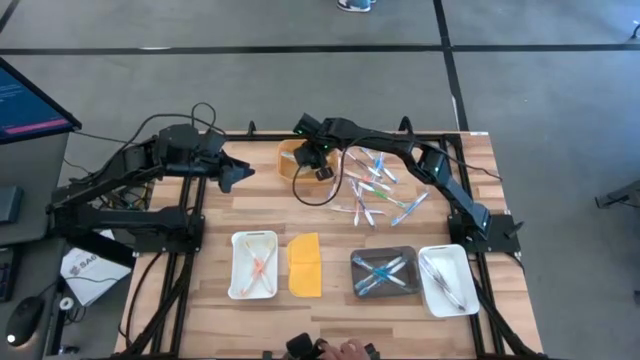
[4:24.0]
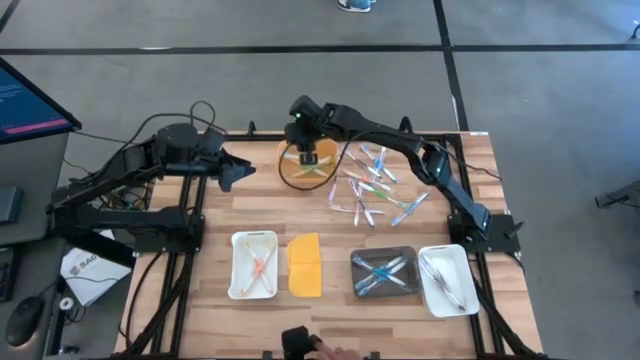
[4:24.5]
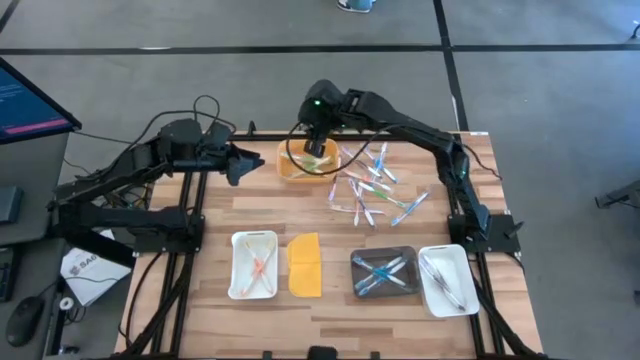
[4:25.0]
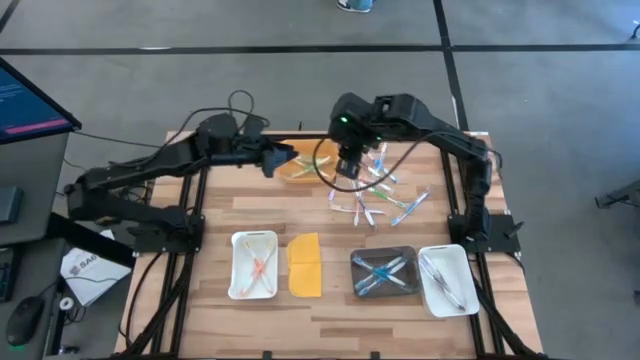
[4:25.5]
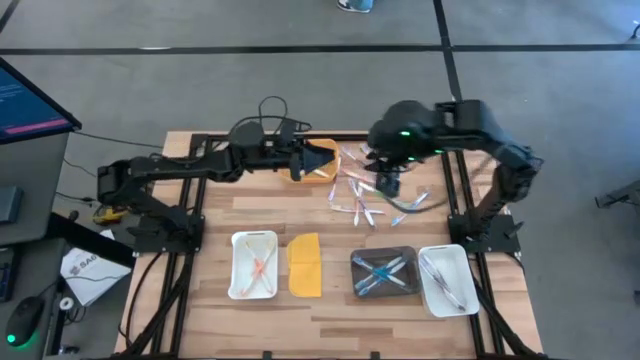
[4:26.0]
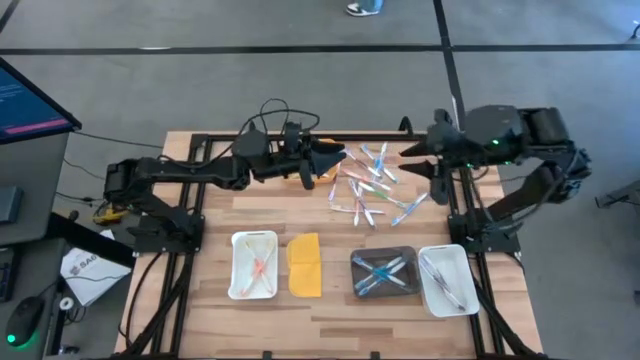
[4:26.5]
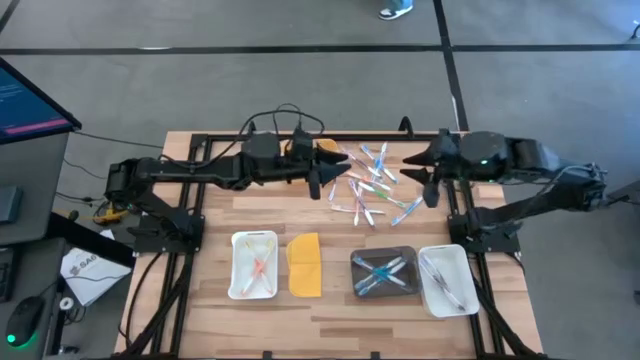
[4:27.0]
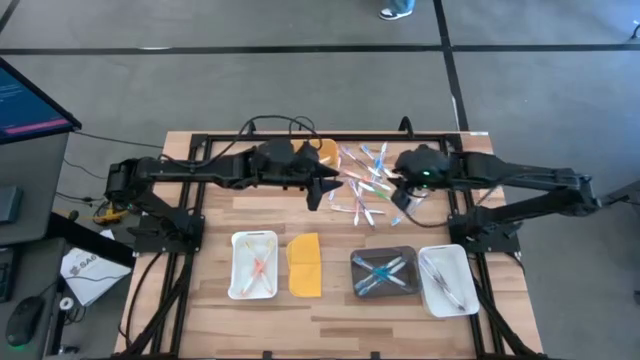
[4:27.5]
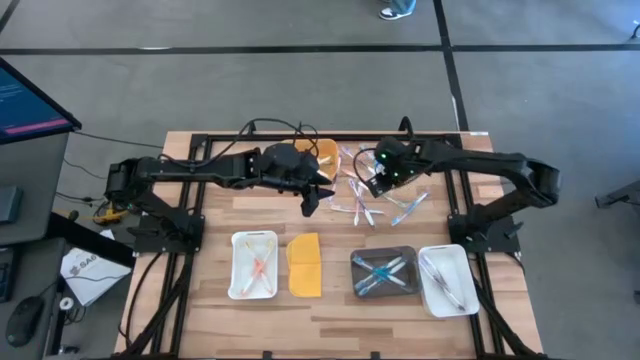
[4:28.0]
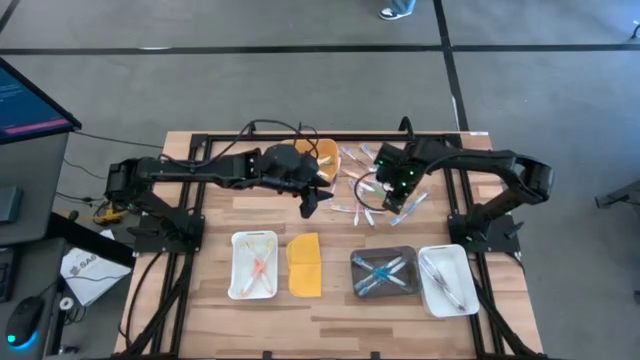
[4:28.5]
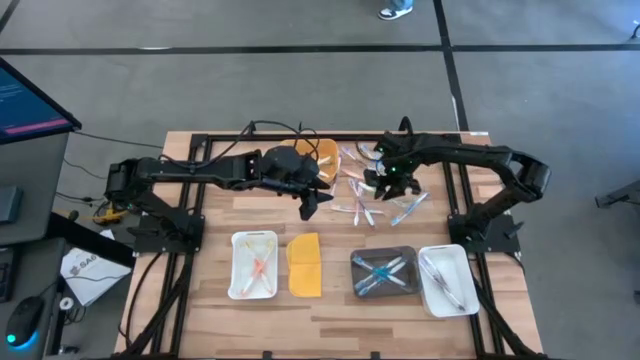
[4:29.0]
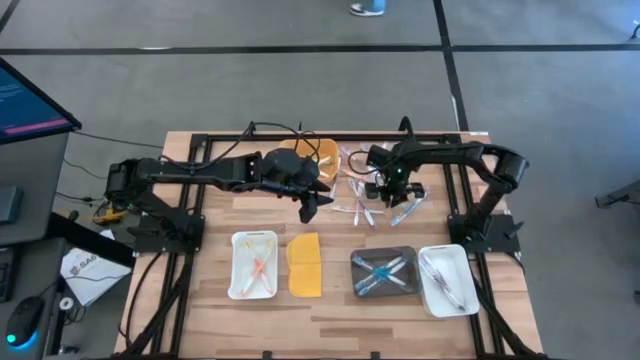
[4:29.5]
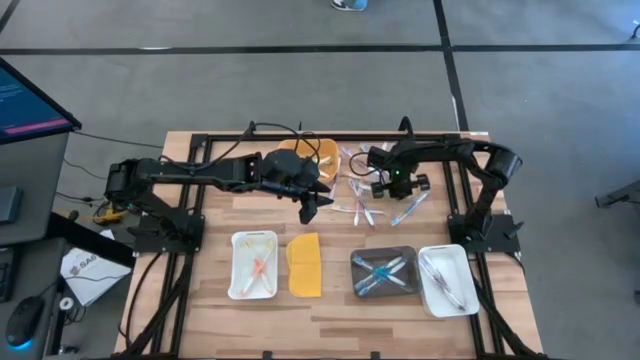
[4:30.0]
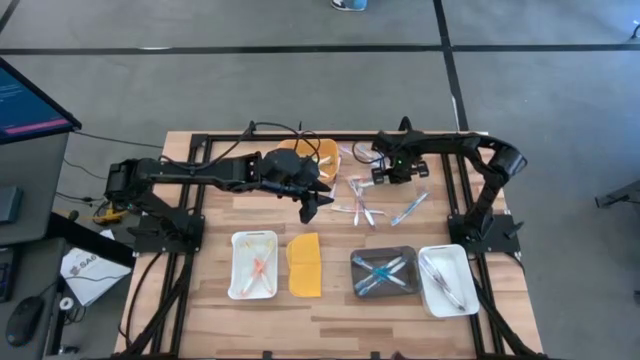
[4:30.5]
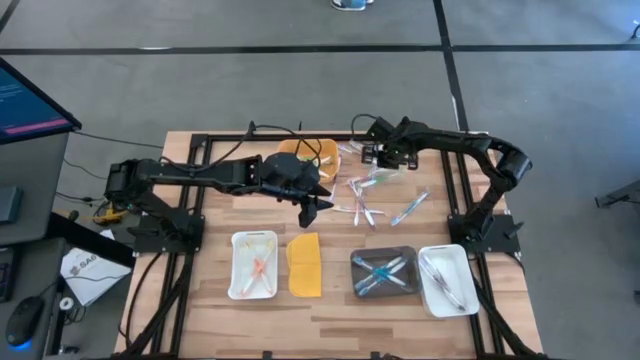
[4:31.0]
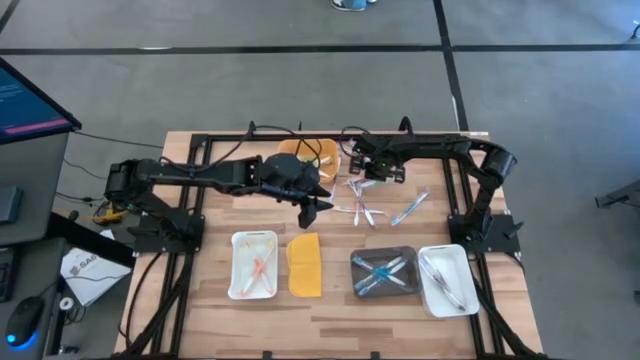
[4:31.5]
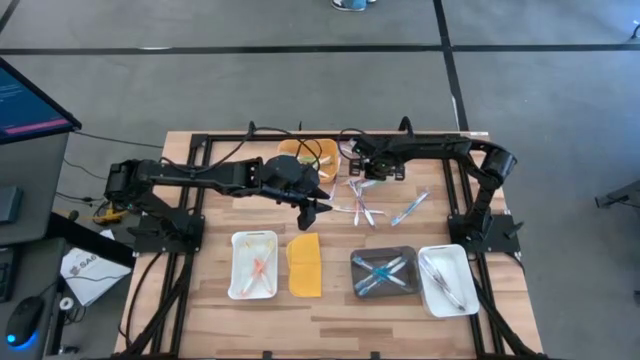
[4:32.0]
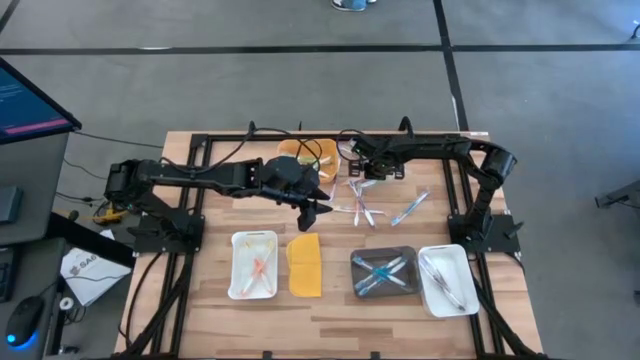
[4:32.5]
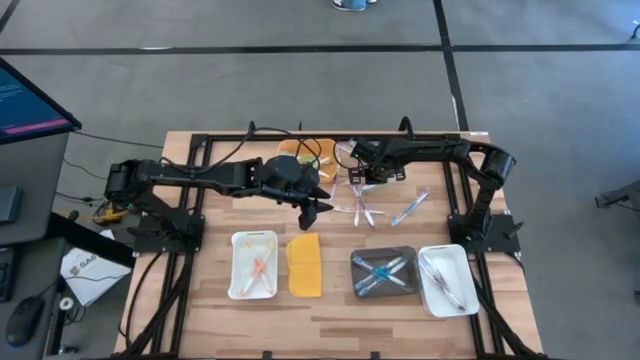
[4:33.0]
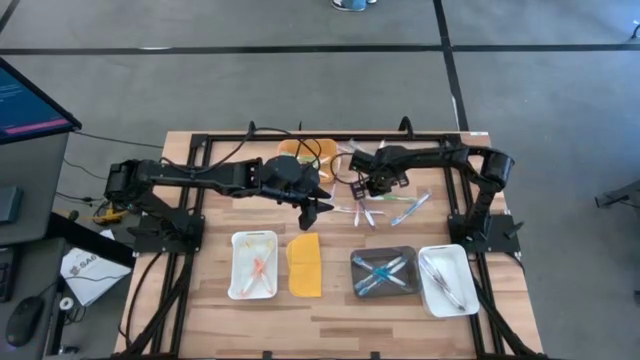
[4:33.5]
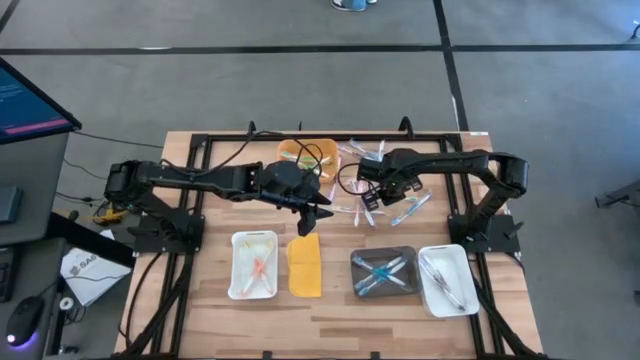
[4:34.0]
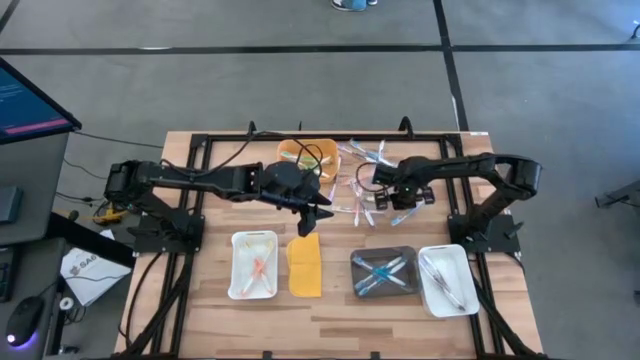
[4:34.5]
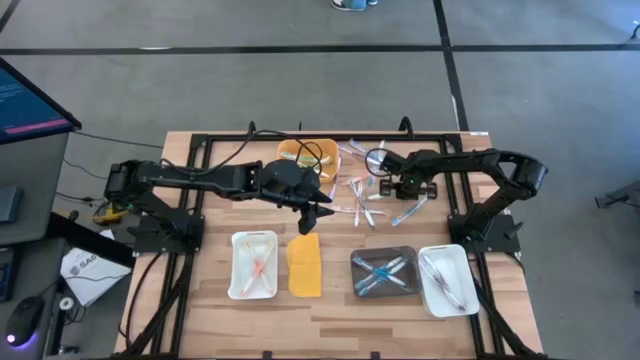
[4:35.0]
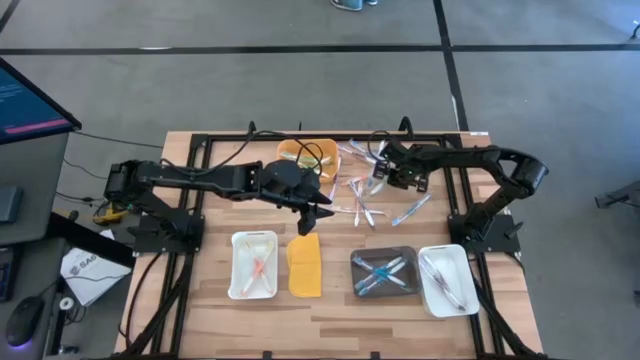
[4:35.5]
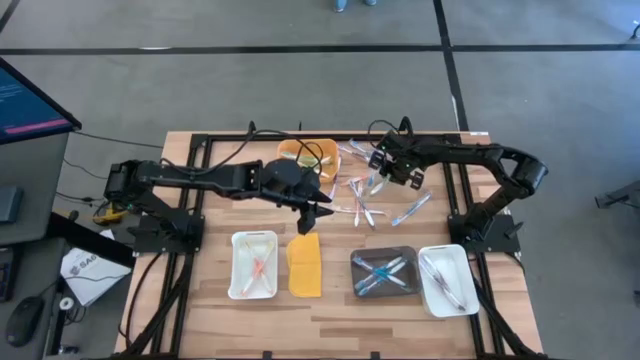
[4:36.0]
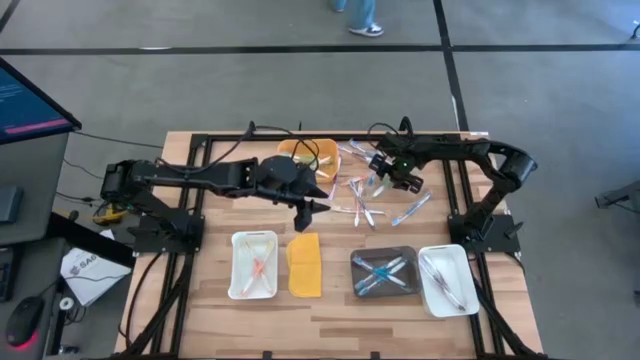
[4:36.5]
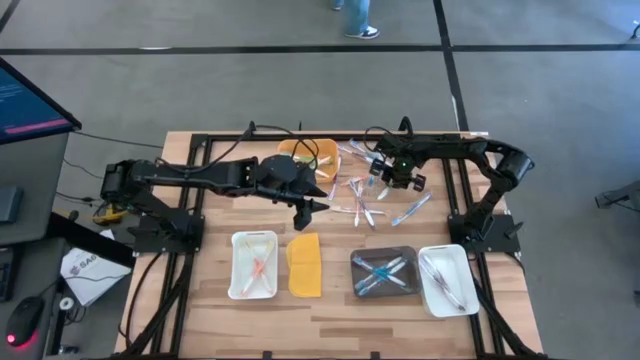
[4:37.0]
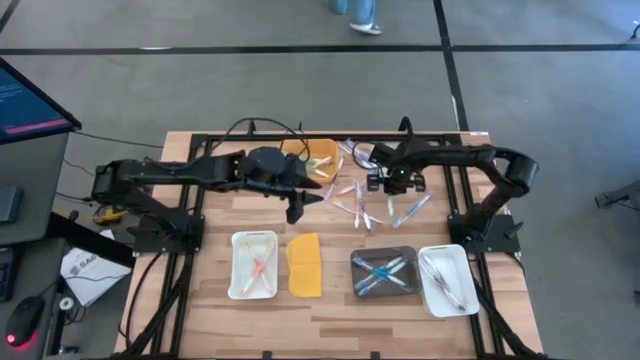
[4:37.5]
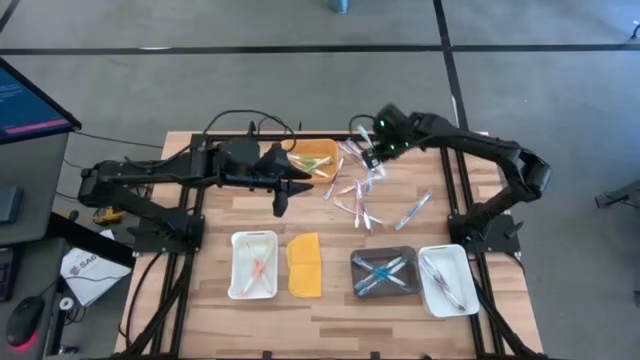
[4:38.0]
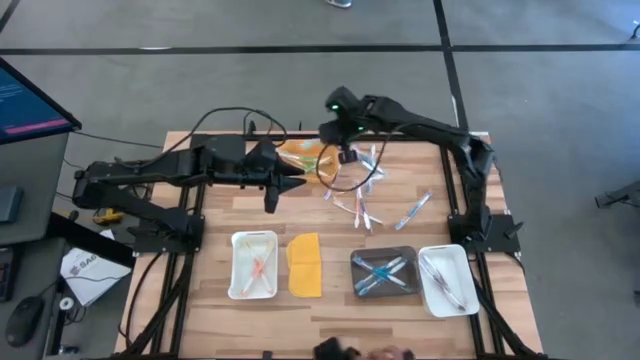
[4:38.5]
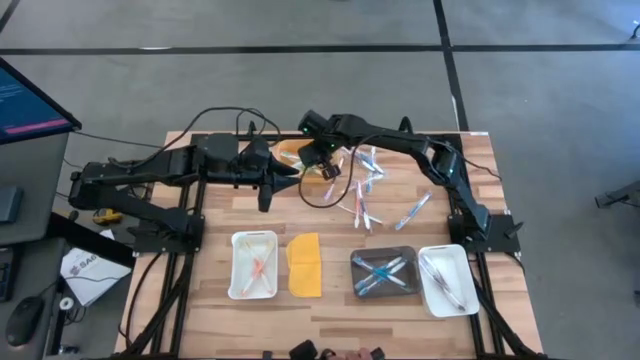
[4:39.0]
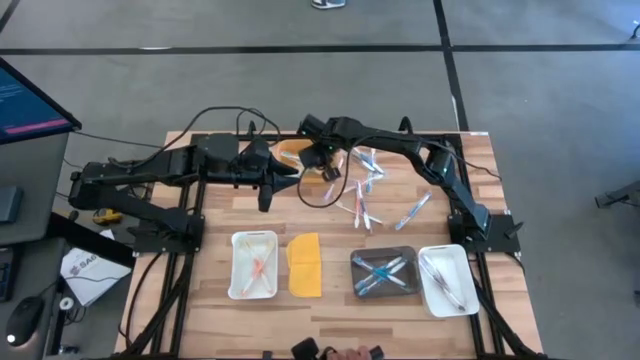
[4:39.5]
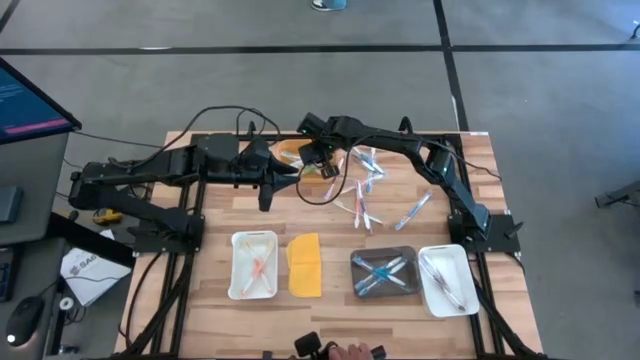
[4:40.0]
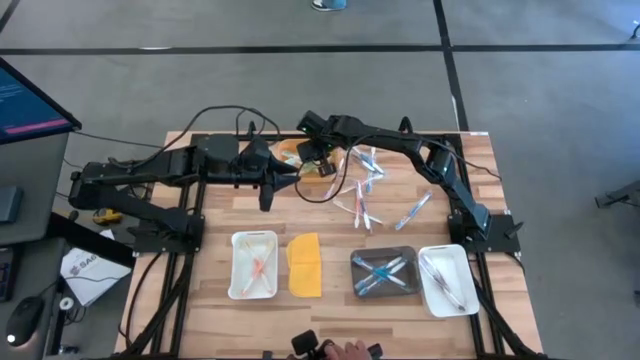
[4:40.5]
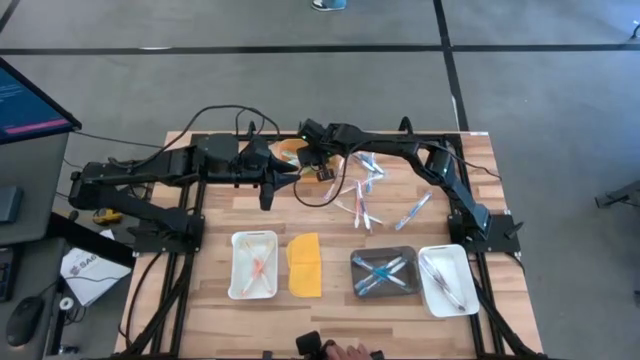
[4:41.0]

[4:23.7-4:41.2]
Task: Pick & Place Toothbrushes
Put the green toothbrush into the yellow bin

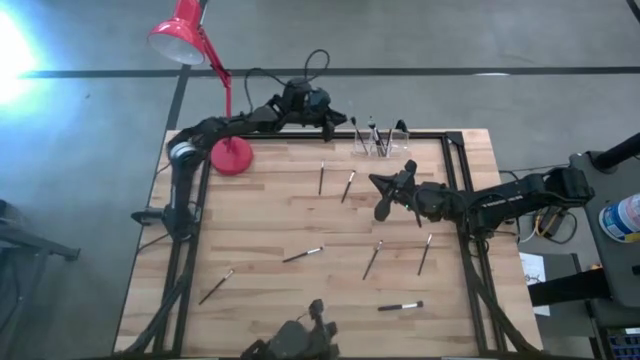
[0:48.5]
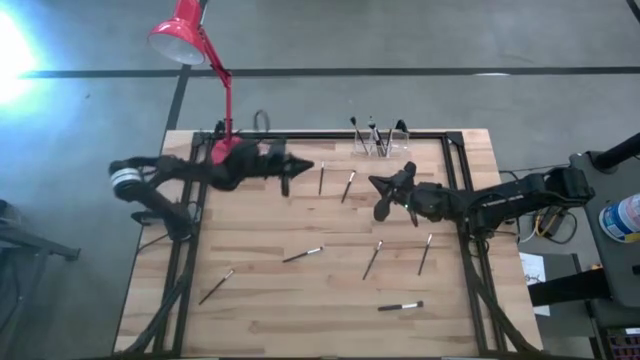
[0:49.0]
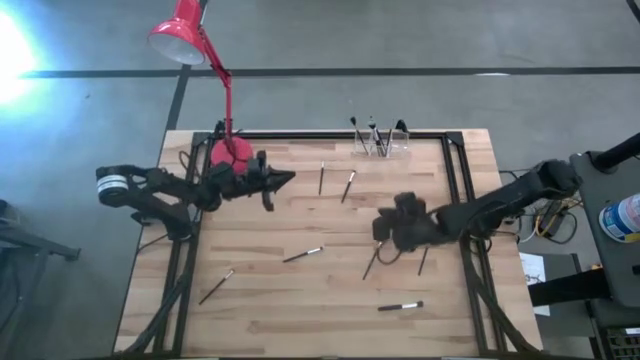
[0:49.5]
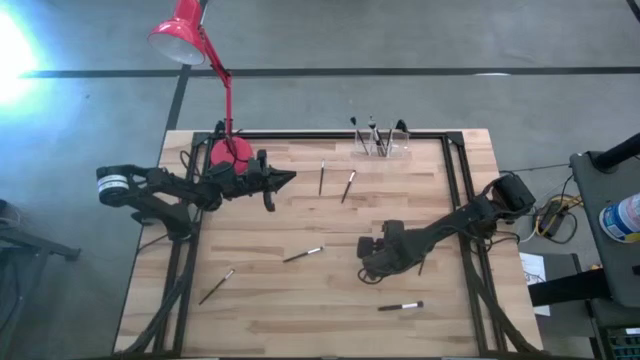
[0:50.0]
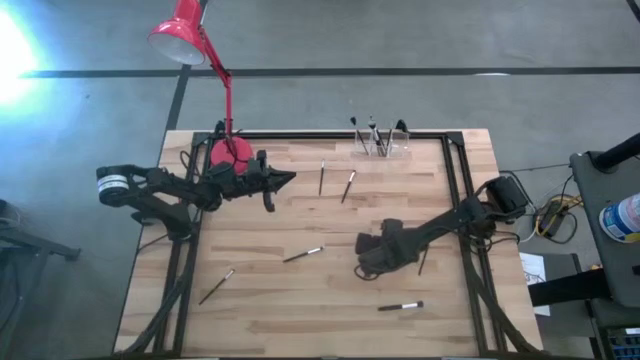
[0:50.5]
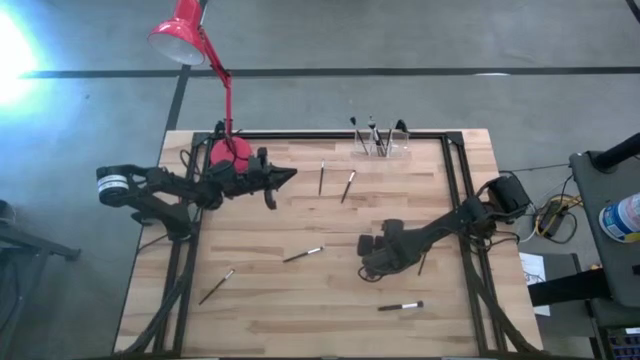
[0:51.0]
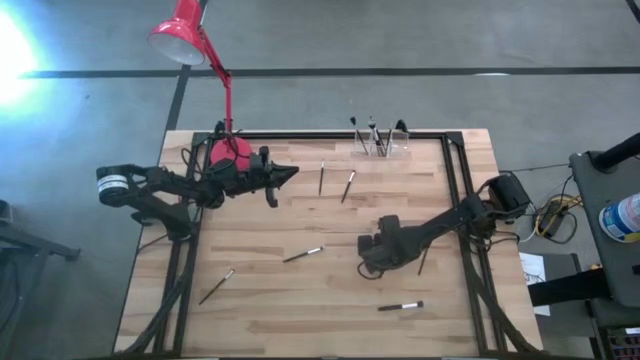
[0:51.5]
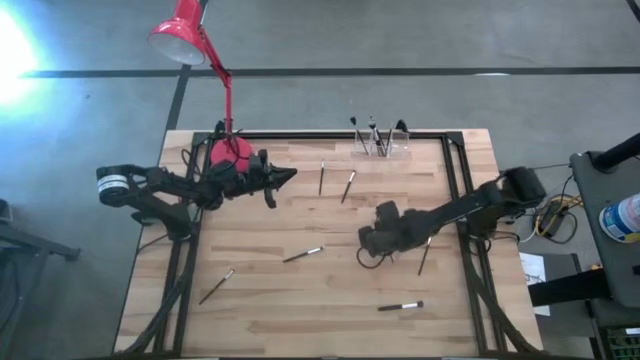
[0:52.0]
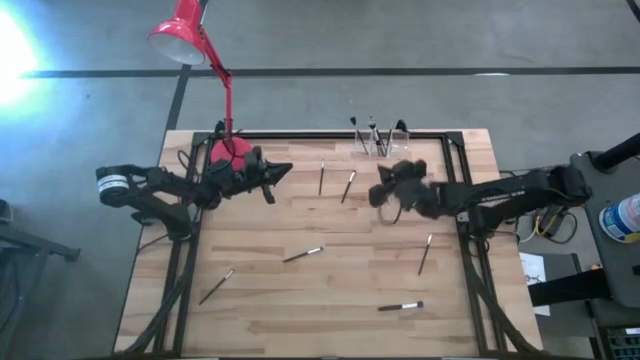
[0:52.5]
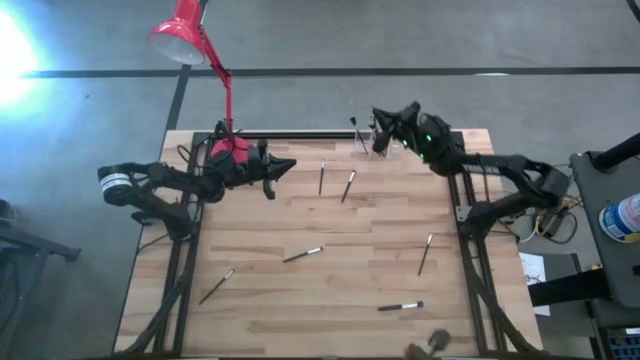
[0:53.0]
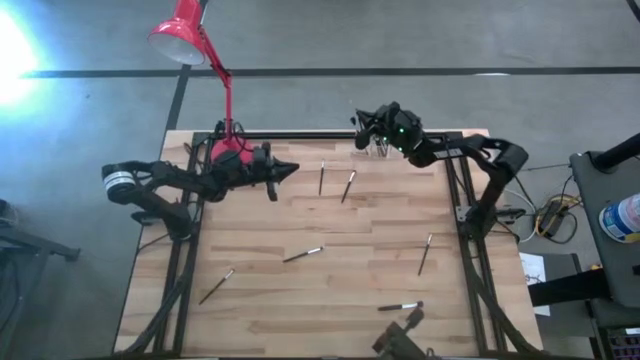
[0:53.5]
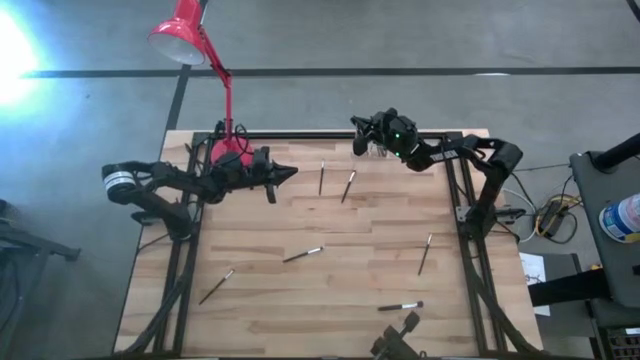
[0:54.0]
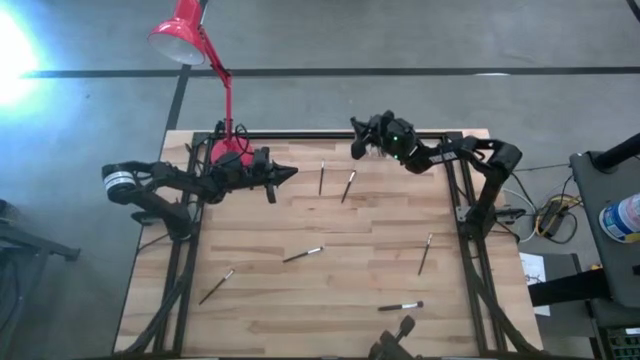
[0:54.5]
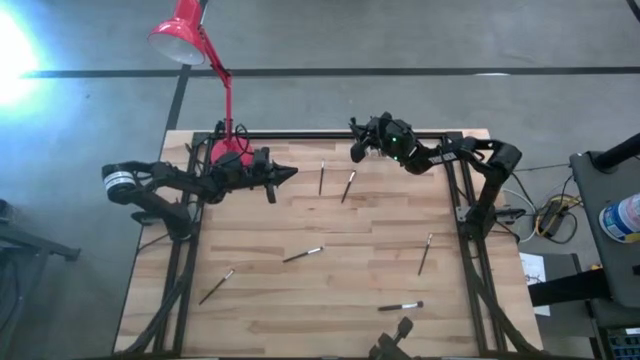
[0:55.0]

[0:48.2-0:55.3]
Task: Put items in baskets/containers
Put the eyeshadow brush into the transparent organizer
